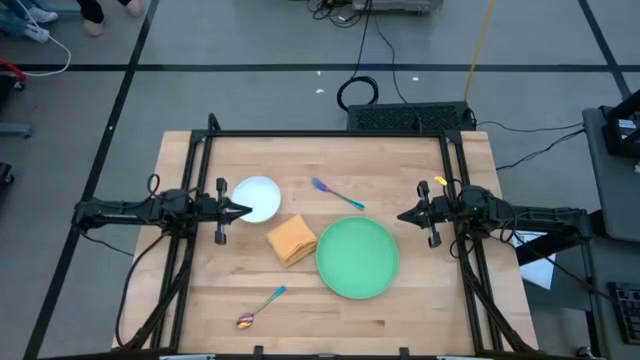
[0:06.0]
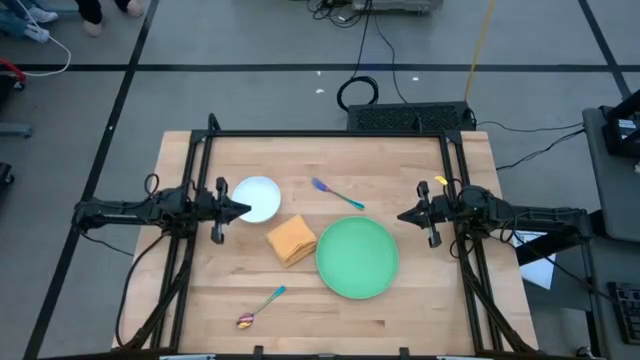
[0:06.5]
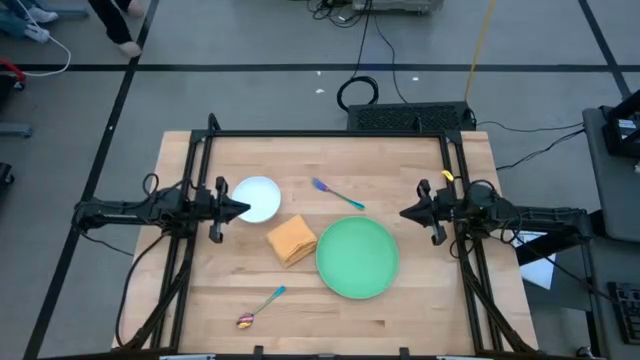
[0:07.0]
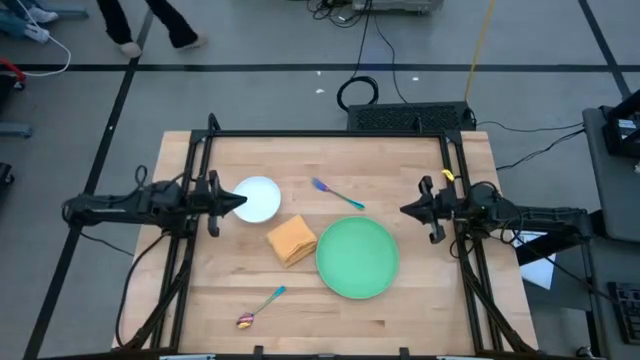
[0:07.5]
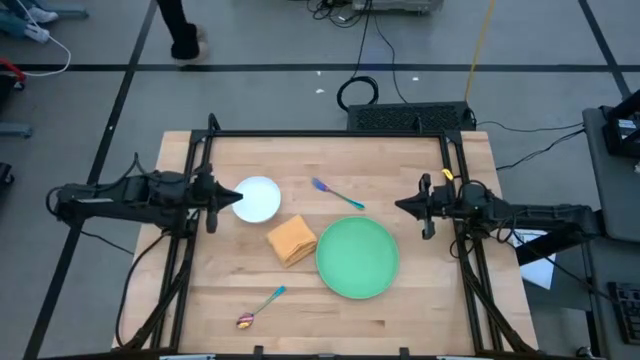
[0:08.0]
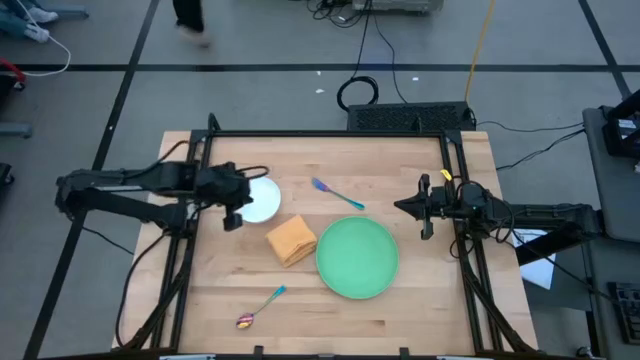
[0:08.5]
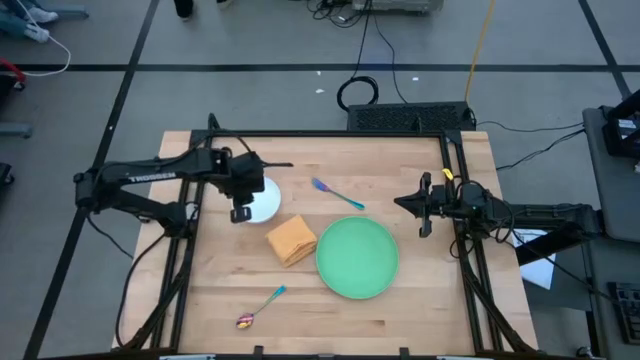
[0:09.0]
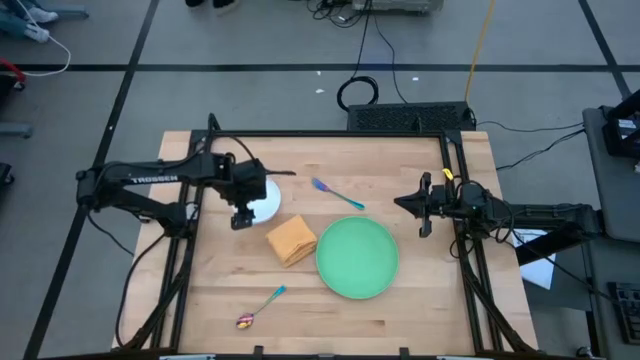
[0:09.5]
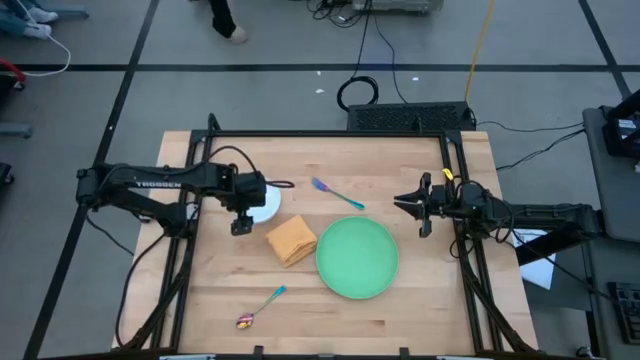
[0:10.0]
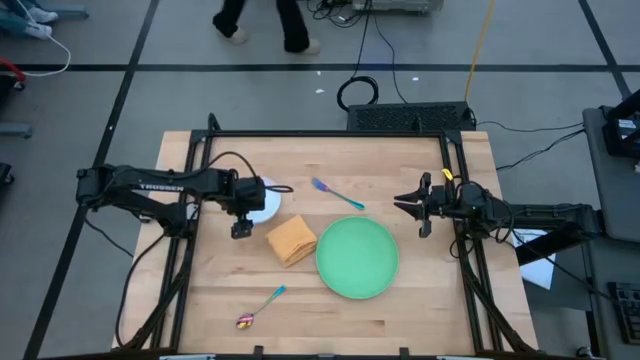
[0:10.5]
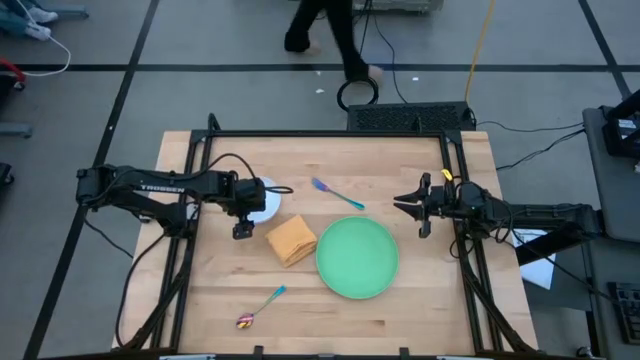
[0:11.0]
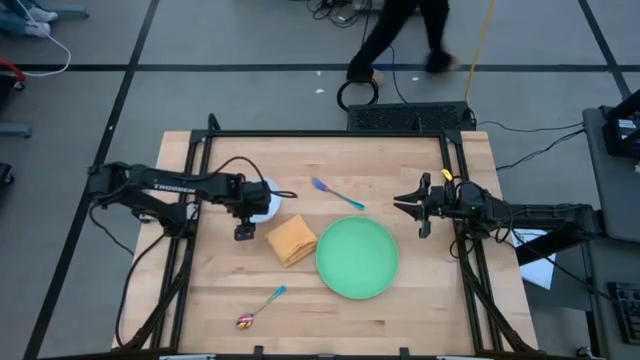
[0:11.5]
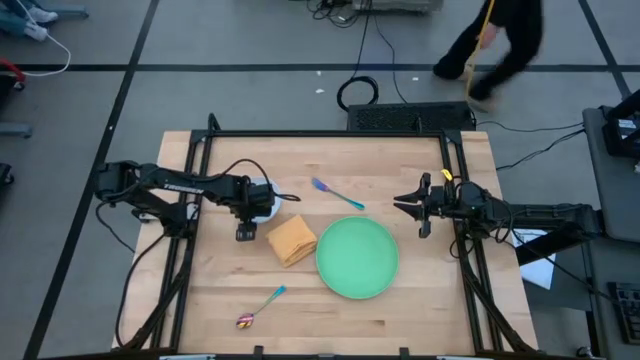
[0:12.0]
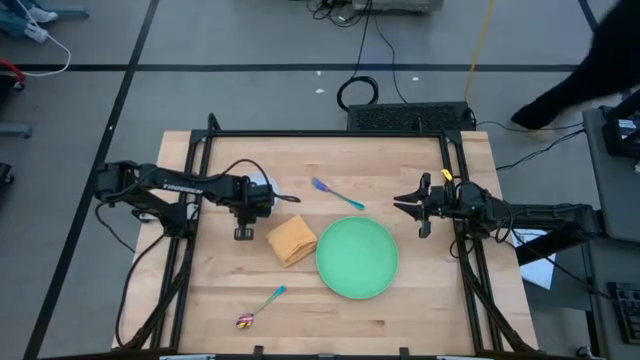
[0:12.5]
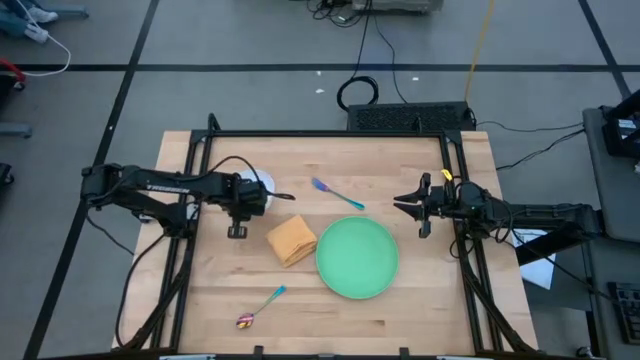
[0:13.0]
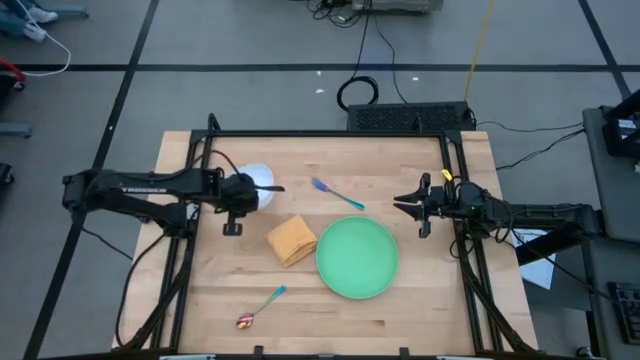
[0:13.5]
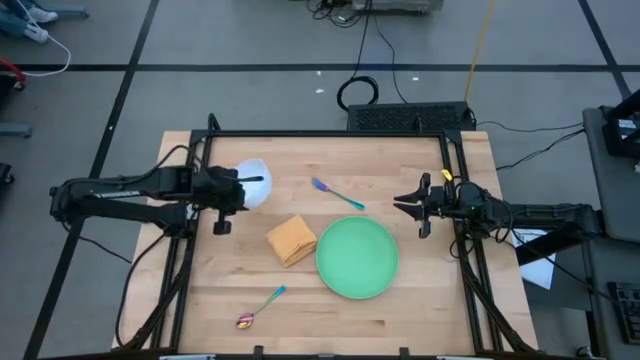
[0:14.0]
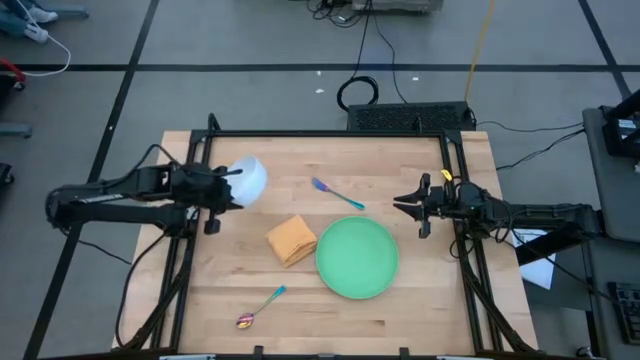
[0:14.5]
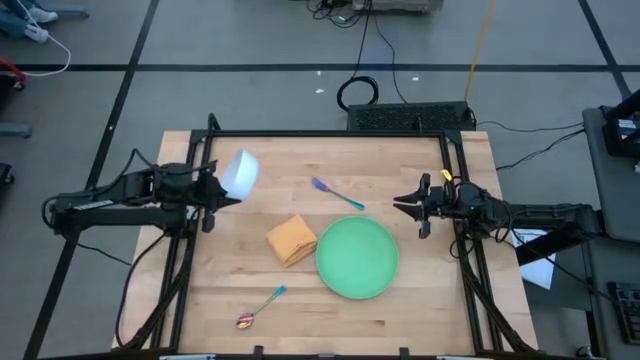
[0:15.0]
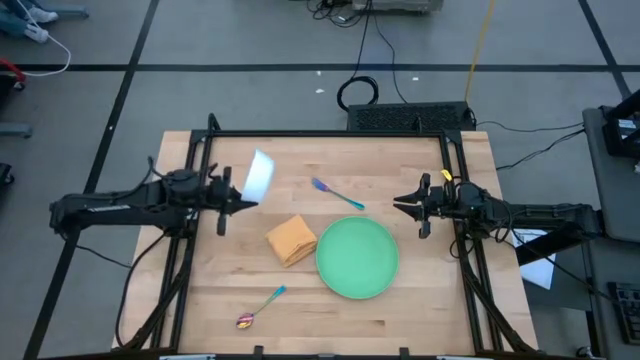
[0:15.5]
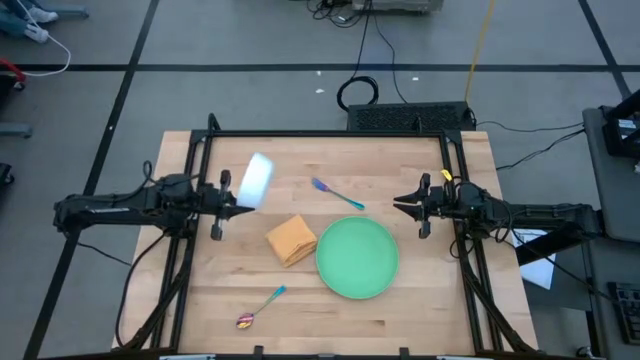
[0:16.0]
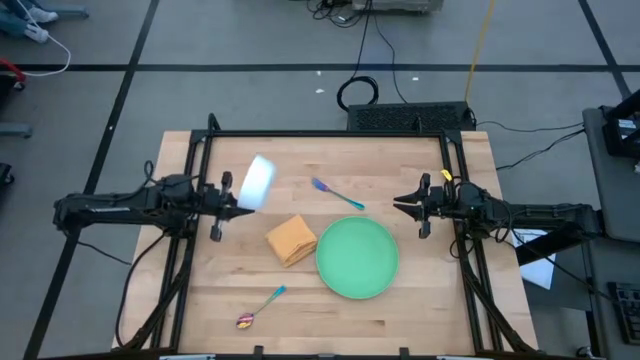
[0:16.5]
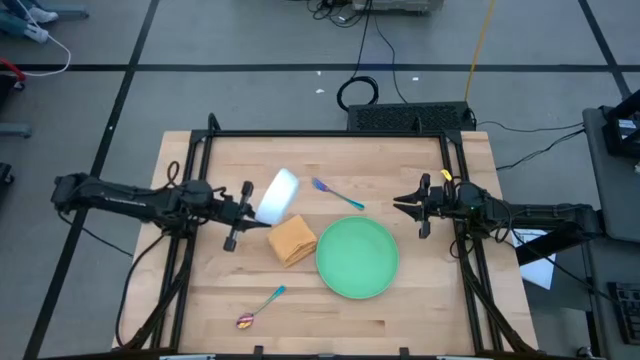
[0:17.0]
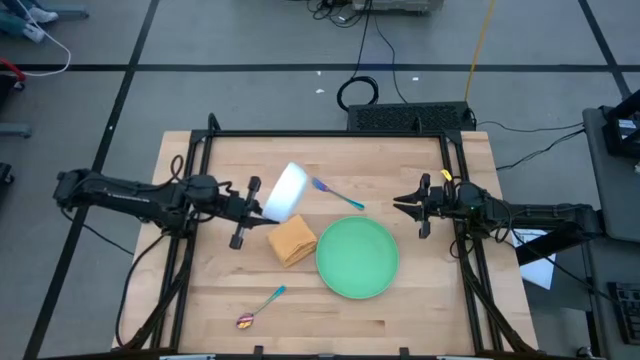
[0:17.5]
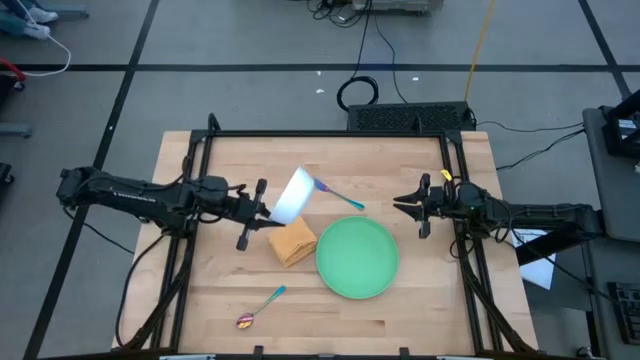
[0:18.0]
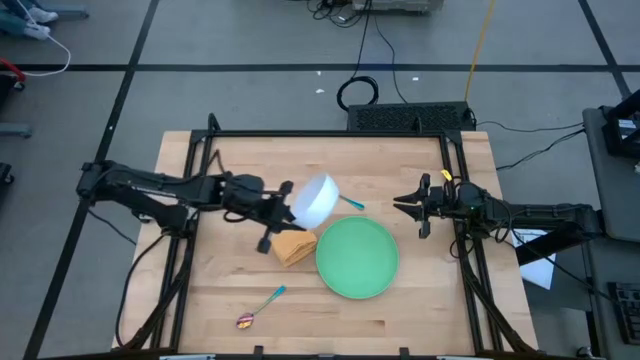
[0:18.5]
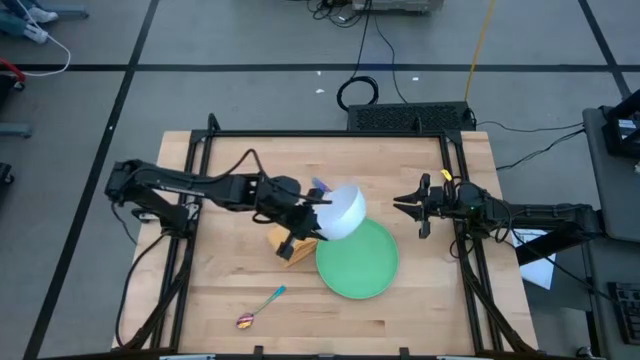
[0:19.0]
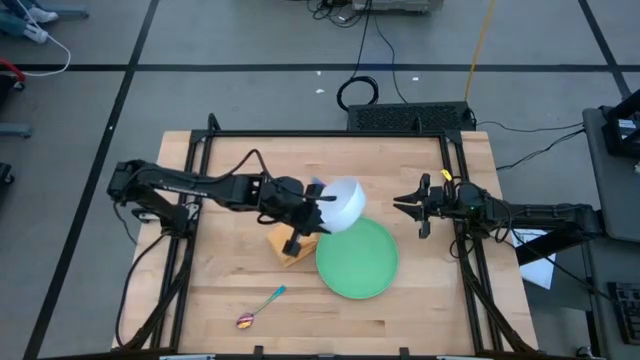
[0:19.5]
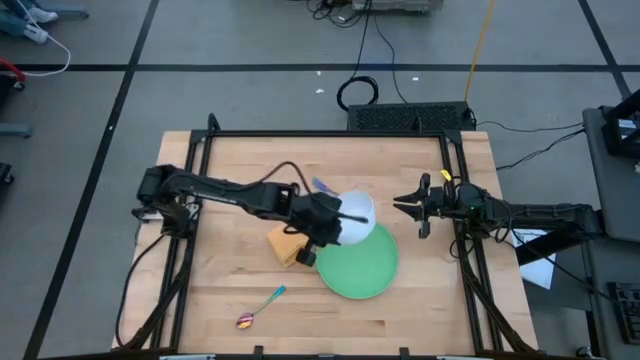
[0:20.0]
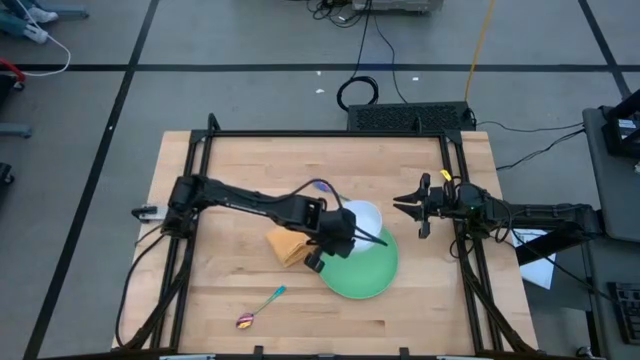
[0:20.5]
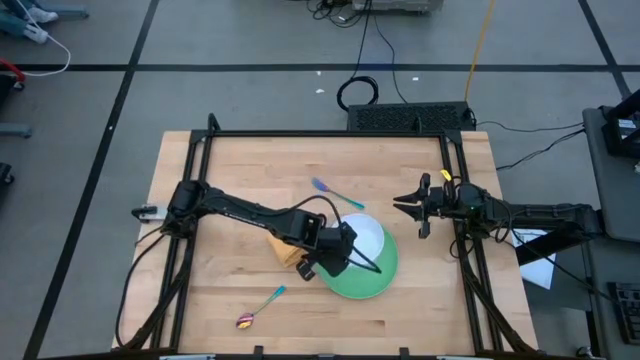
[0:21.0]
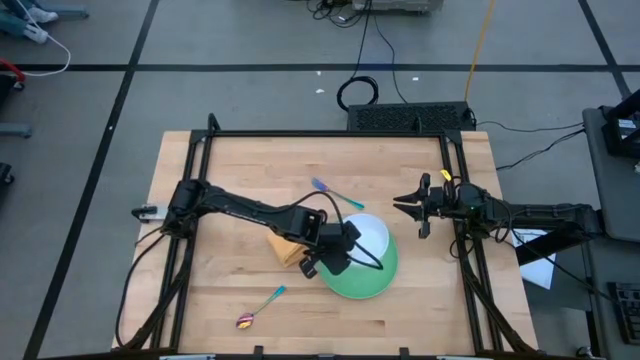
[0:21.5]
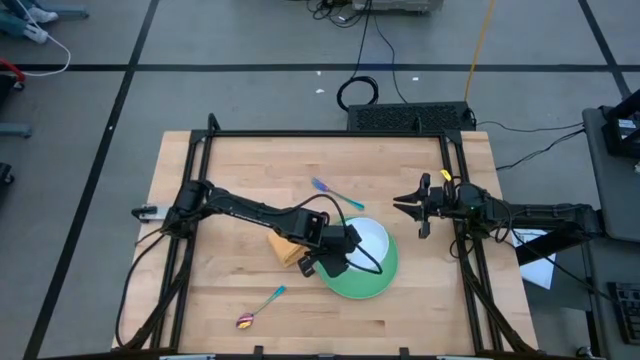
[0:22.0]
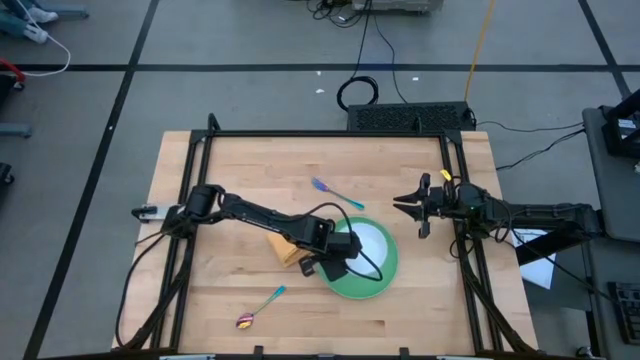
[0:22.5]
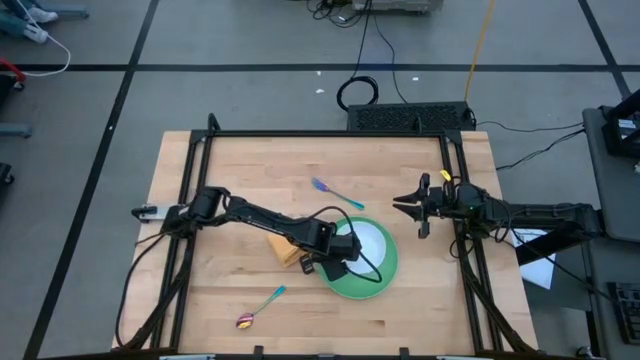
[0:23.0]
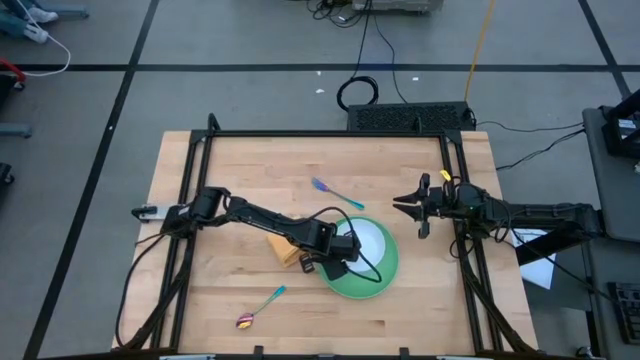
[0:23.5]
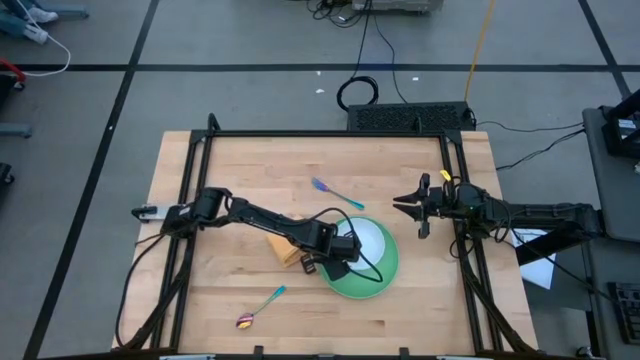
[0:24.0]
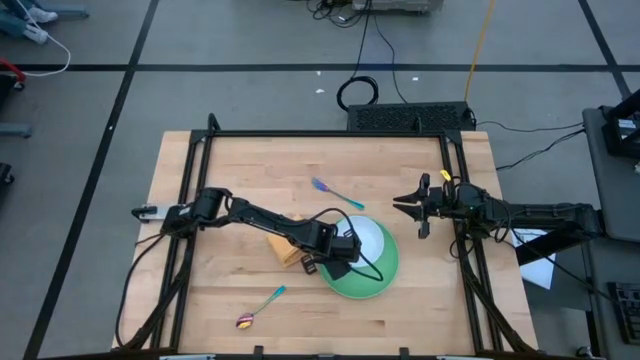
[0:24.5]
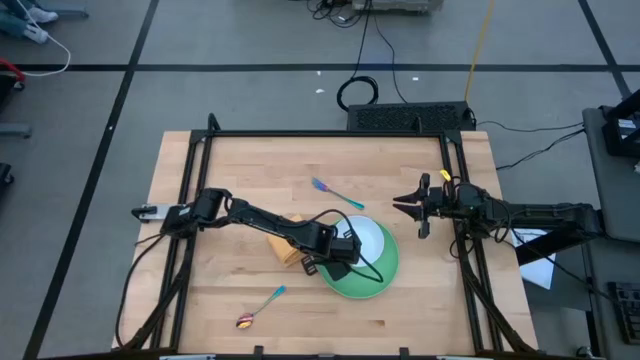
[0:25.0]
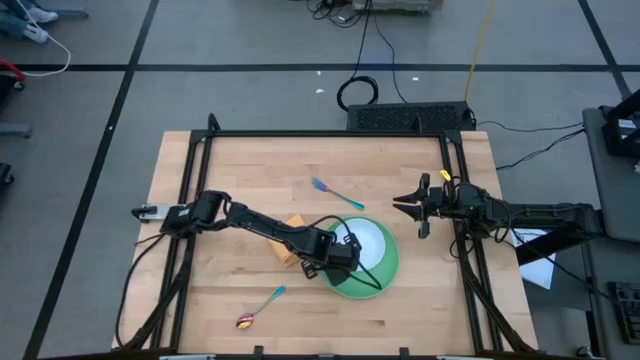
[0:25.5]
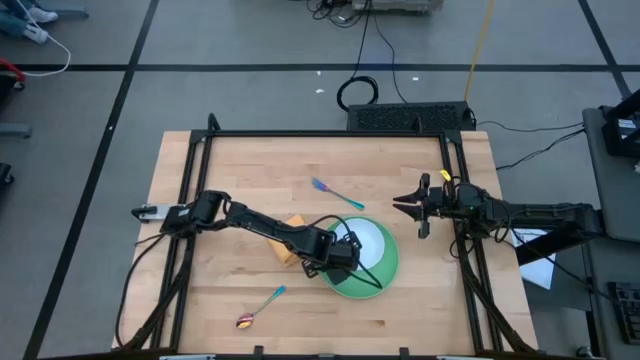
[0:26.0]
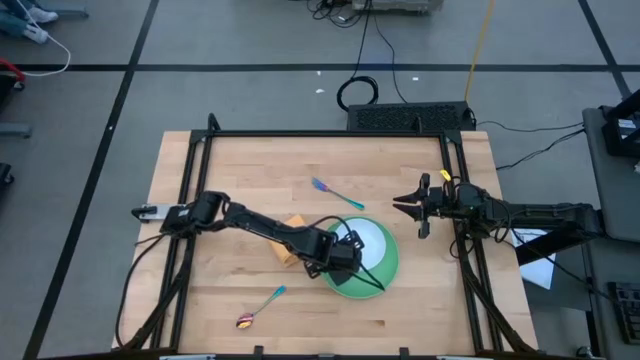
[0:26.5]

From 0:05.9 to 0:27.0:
Task: Set table place
Put the white bowl on the light green plate
